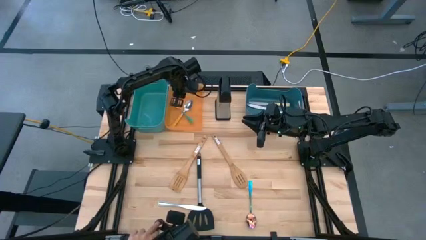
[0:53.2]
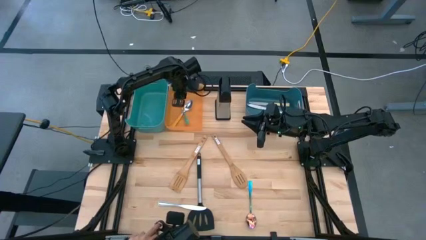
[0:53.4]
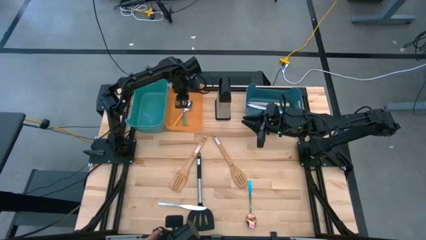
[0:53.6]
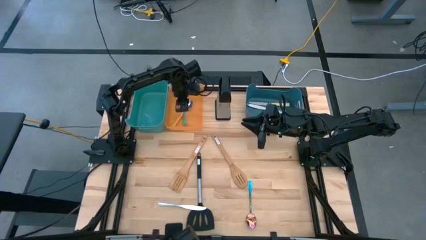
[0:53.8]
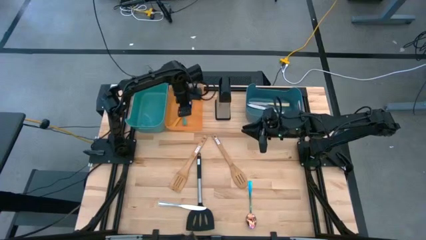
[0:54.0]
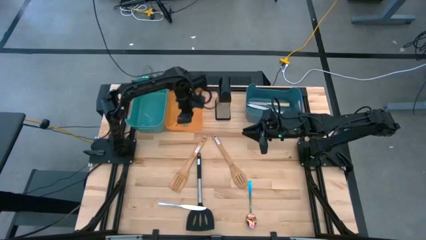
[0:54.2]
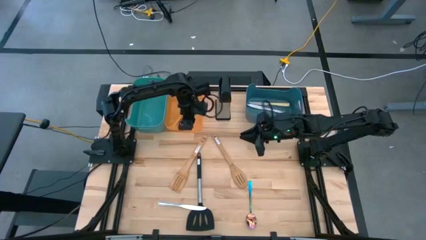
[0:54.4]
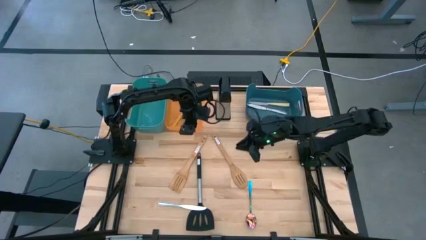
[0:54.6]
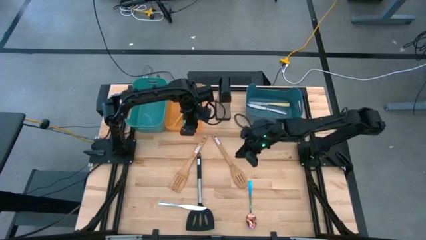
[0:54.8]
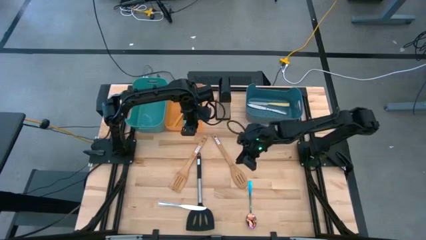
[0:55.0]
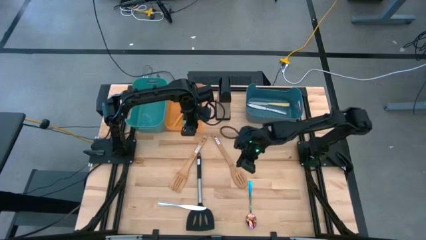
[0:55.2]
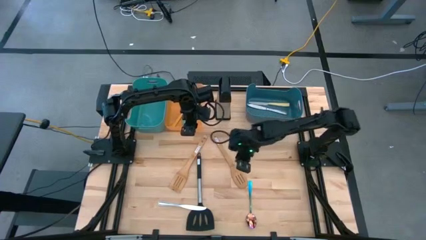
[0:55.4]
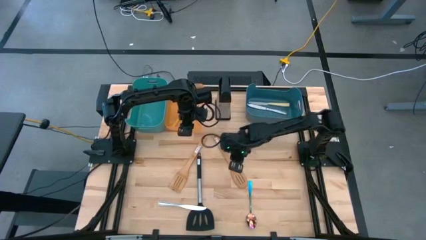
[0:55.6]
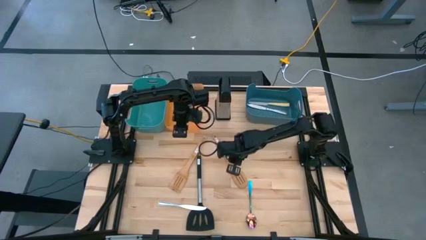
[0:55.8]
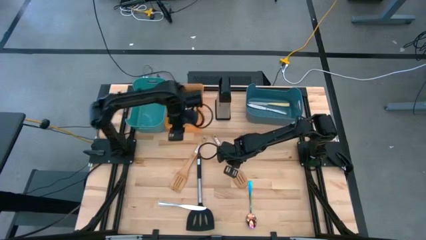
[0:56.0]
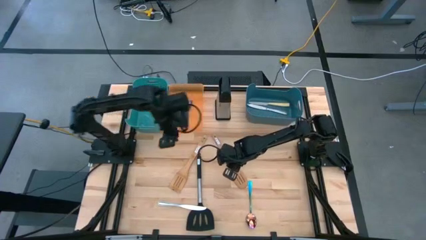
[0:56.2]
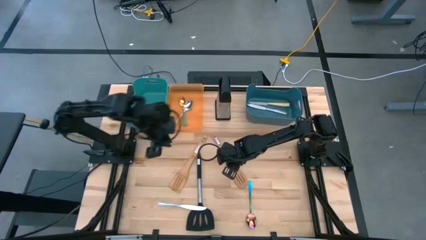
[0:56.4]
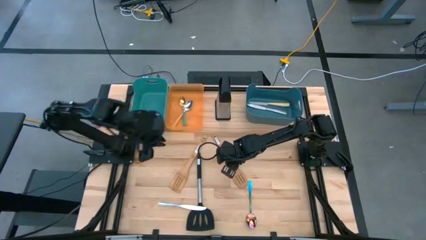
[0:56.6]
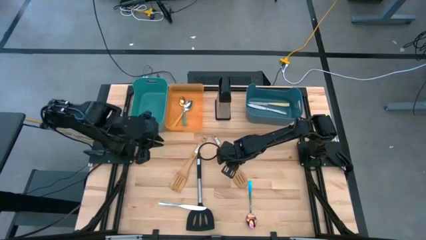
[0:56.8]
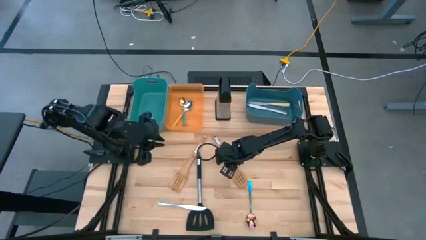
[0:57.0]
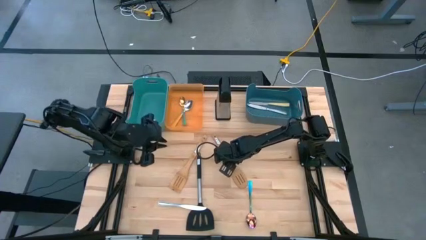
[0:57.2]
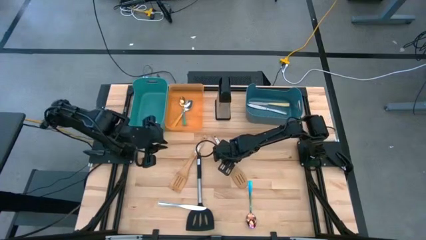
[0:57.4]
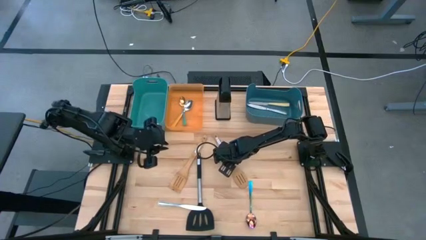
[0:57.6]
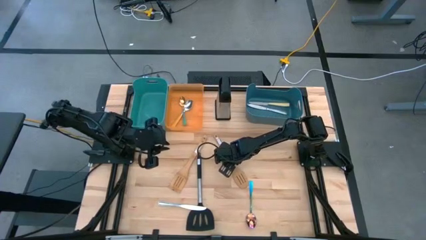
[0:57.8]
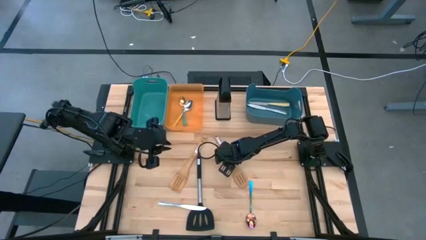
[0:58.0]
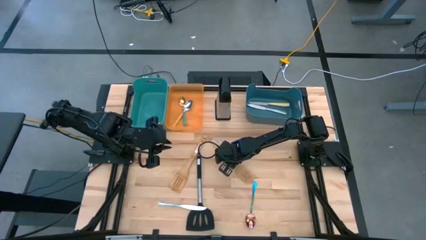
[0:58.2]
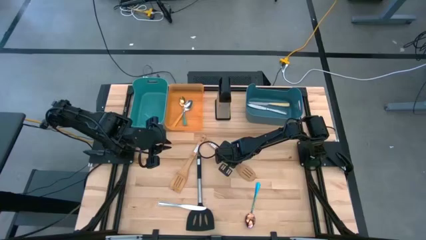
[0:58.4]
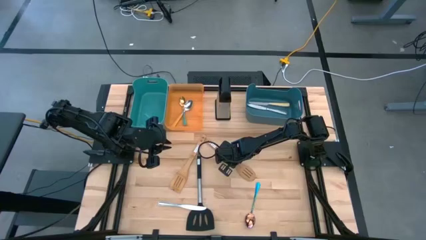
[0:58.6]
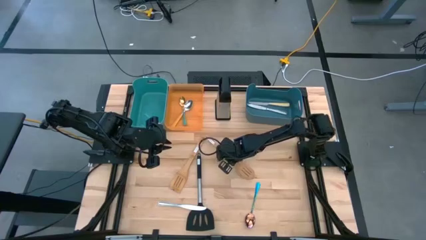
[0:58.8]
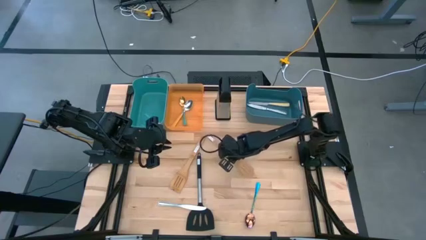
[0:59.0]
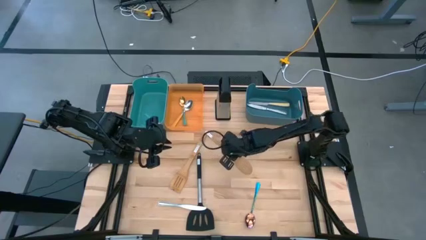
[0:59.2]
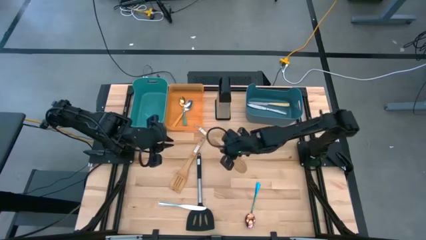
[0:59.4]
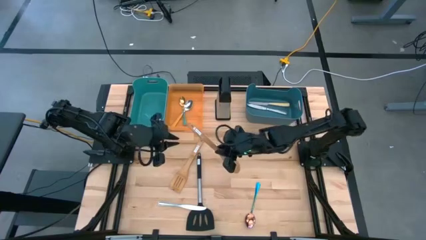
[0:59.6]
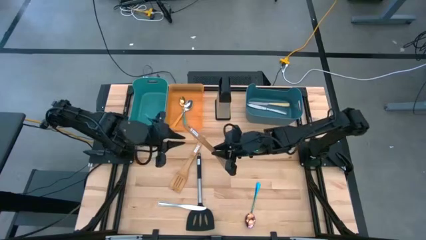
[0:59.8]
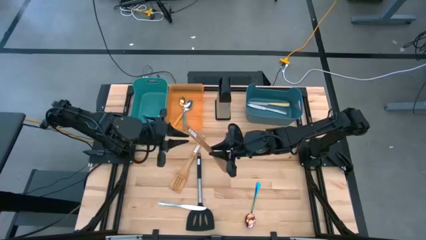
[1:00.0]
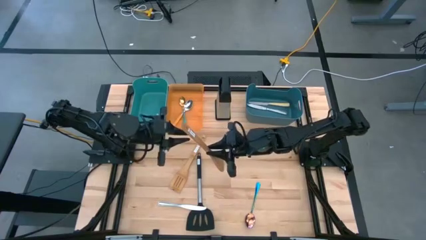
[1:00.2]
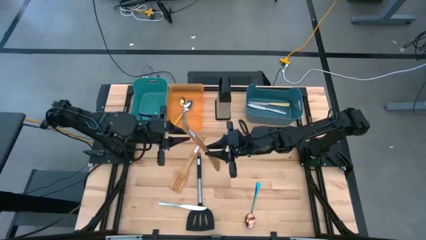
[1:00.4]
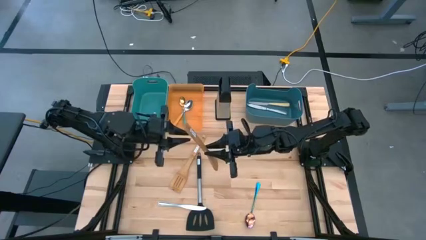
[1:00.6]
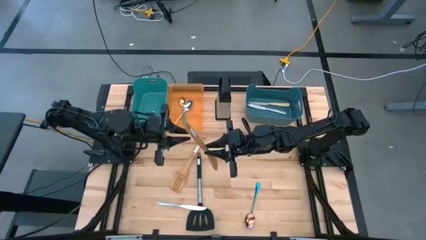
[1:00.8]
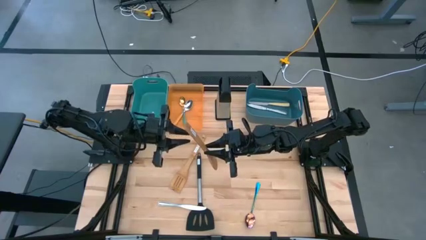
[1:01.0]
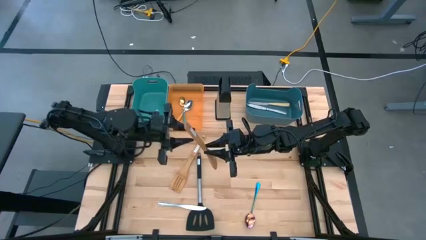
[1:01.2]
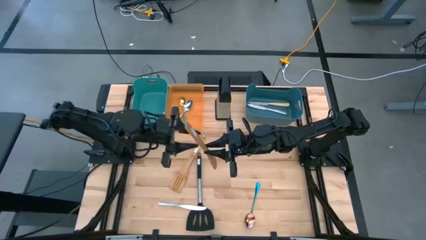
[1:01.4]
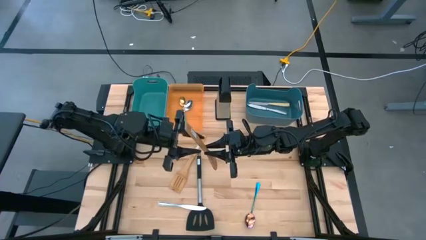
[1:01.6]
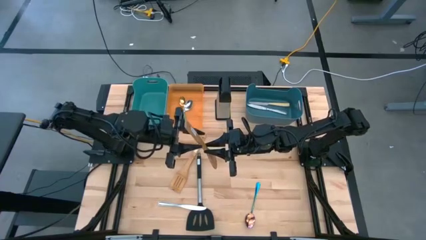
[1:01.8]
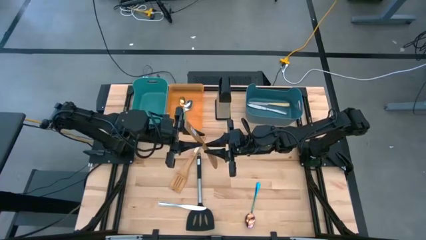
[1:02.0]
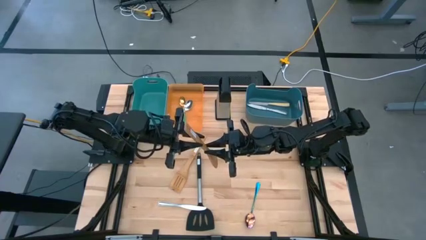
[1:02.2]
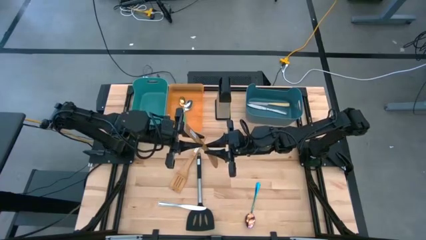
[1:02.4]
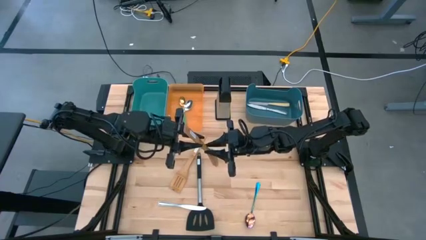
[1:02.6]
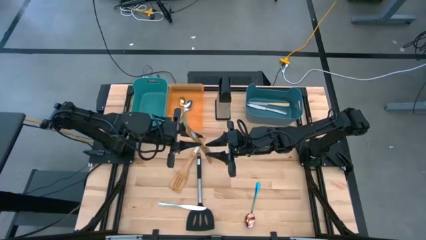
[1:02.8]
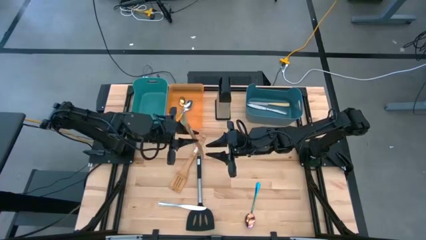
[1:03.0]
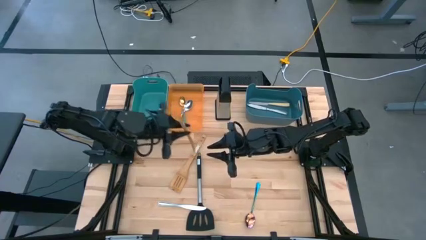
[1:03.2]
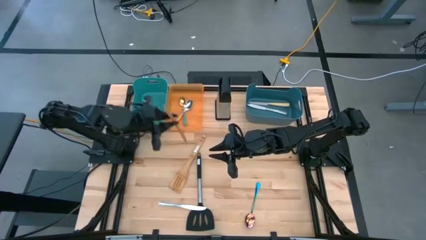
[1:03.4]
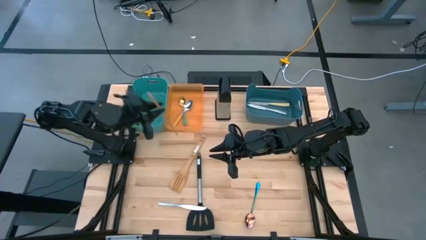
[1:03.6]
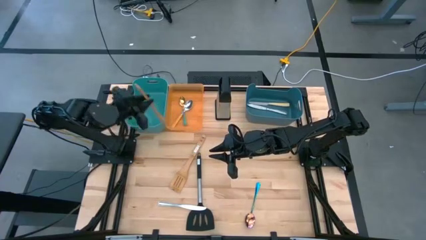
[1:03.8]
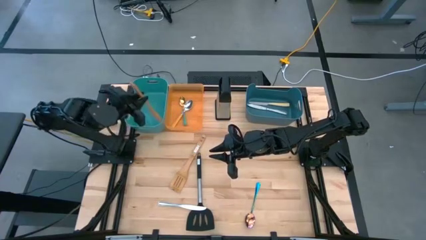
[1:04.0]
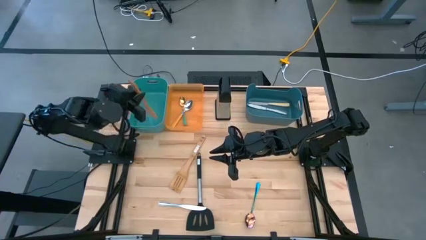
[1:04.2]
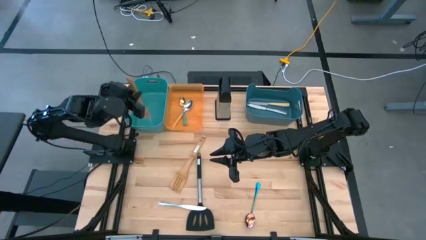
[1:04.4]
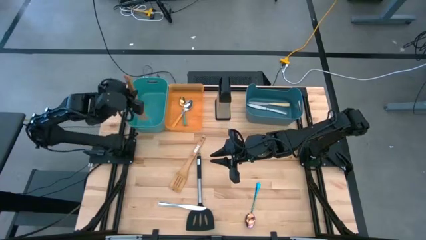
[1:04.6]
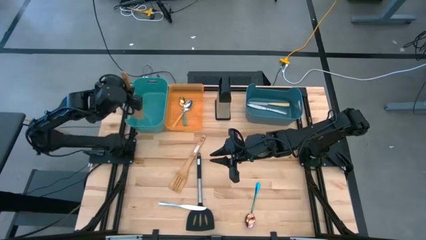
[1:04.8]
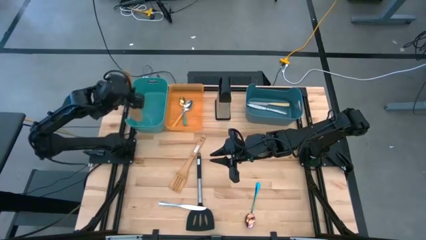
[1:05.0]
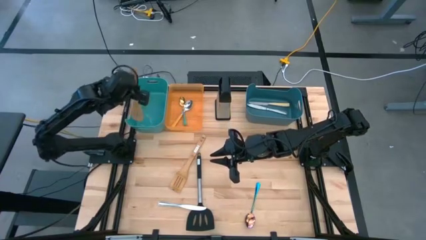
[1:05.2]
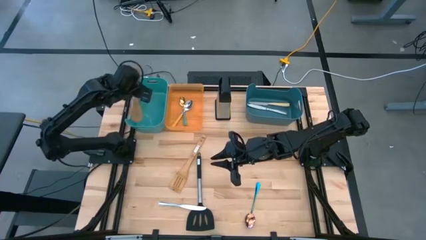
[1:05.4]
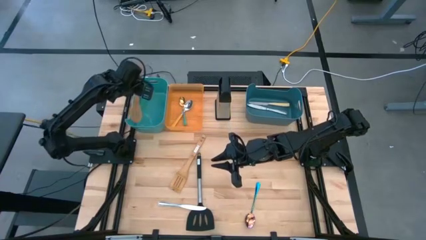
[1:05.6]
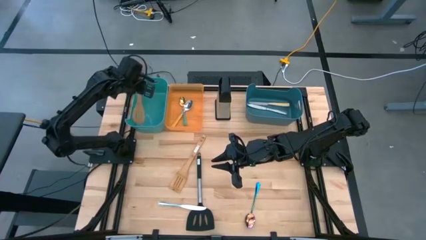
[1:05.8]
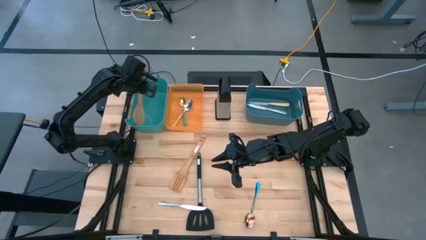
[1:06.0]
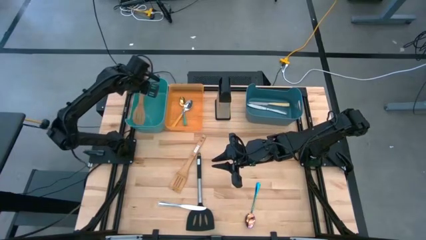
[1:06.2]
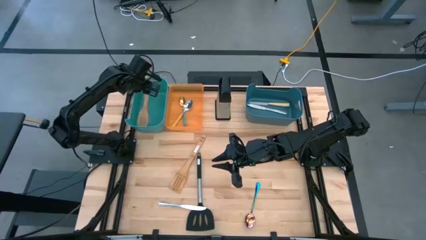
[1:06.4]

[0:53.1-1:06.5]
Task: Pick & Place Kitchen Items
Put the right brown spatula into the green bin

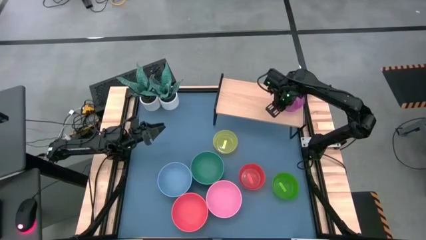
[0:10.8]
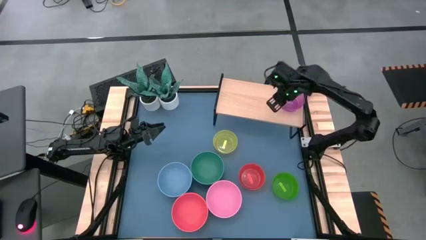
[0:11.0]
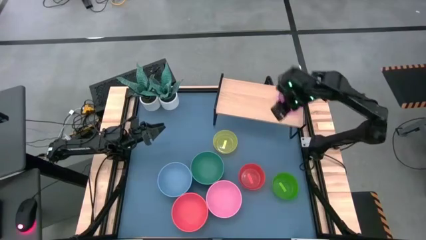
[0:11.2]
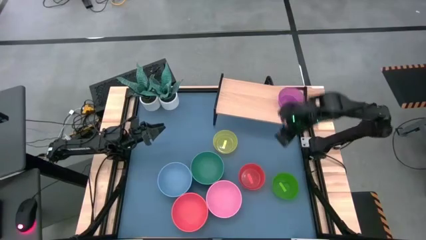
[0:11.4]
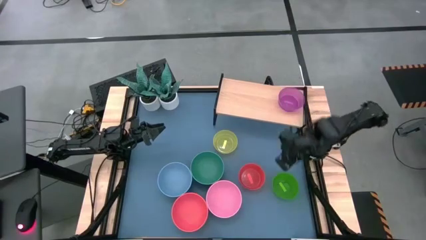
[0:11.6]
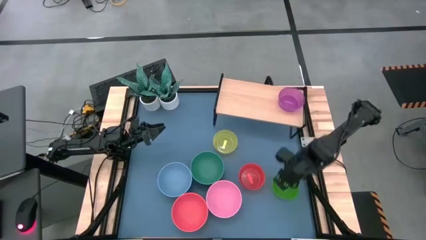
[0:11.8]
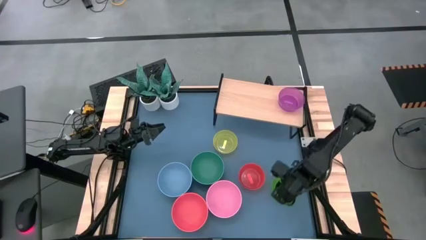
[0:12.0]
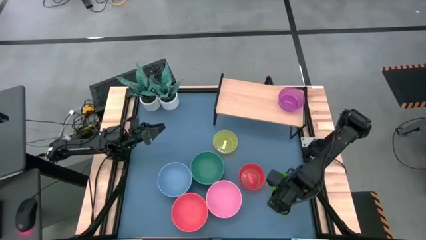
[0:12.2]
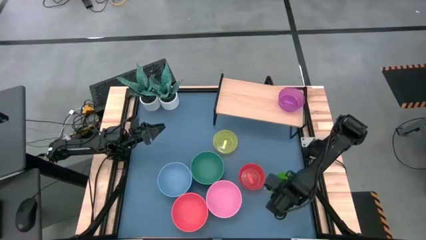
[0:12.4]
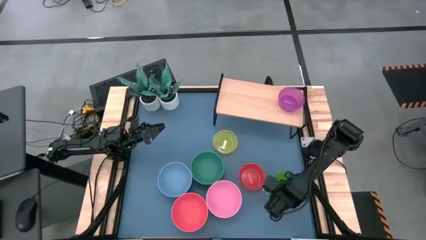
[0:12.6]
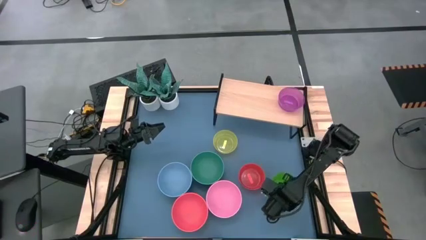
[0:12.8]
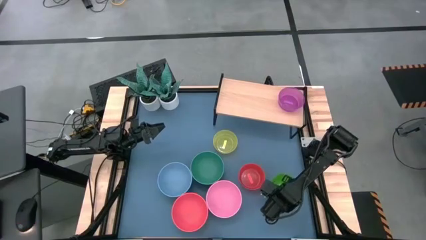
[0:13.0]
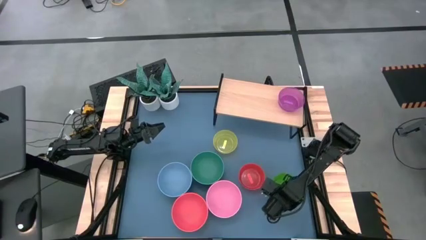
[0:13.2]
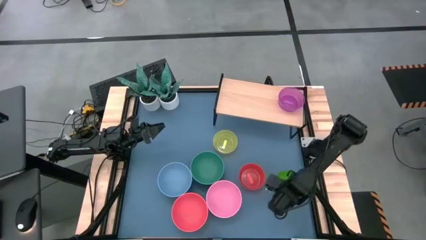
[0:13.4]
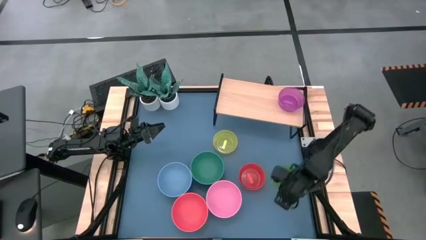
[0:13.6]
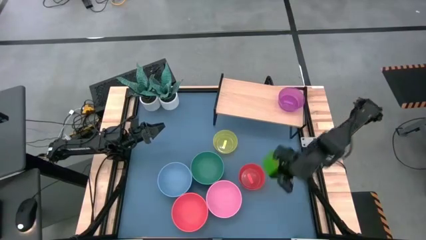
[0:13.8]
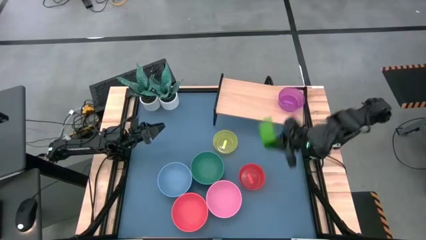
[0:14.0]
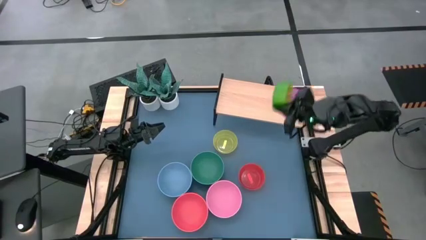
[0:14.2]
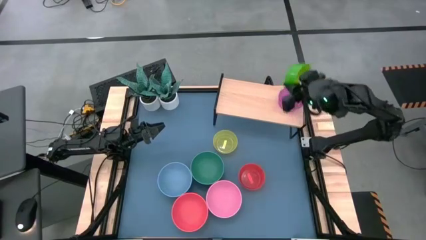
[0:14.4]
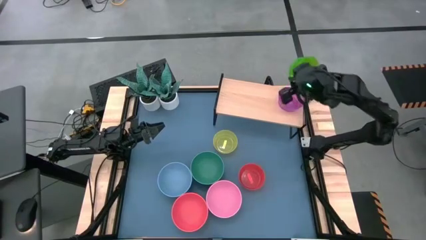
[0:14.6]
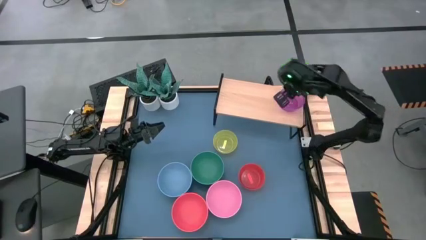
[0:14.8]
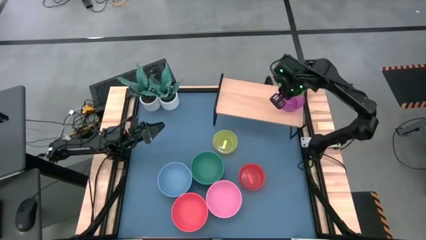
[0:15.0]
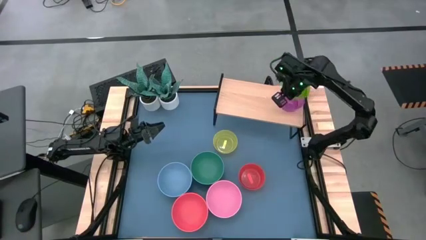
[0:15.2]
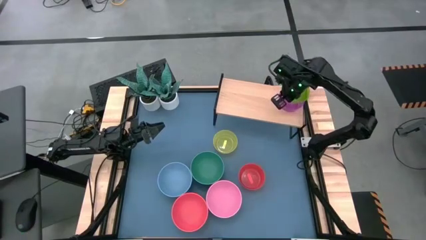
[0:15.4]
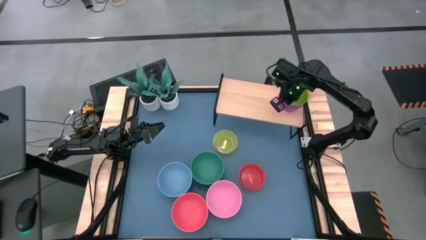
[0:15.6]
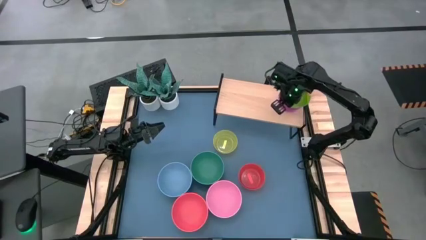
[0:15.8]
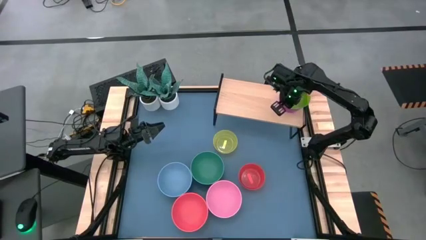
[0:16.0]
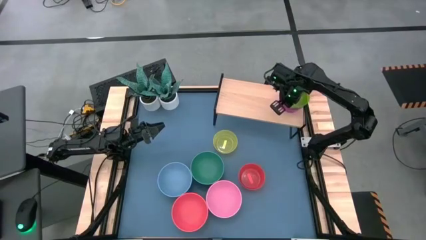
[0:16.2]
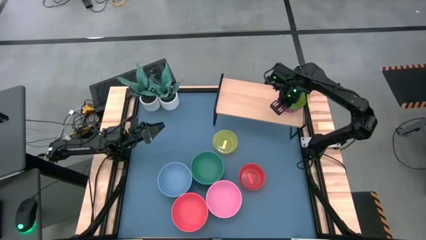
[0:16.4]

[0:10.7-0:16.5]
Task: Place and stack bowls onto a shelf
Stack the small light green bowl on top of the small violet bowl on the shelf
